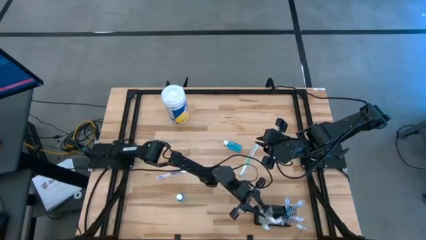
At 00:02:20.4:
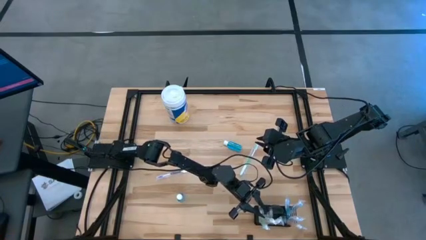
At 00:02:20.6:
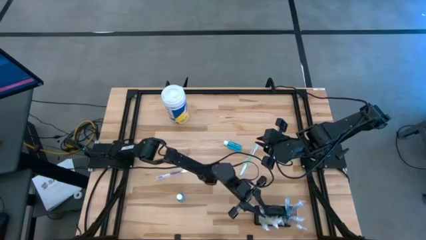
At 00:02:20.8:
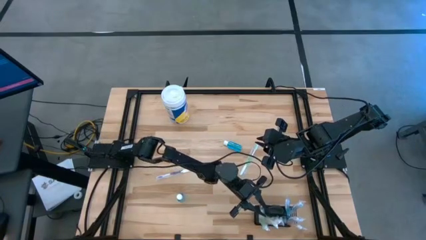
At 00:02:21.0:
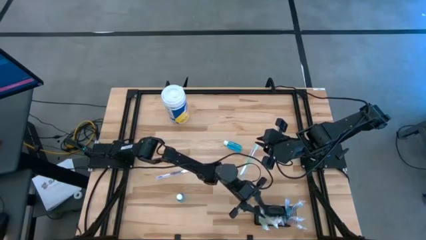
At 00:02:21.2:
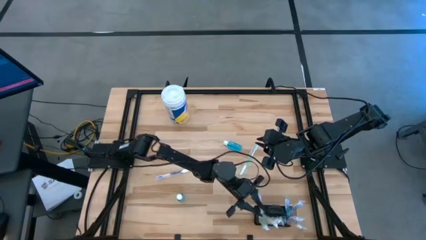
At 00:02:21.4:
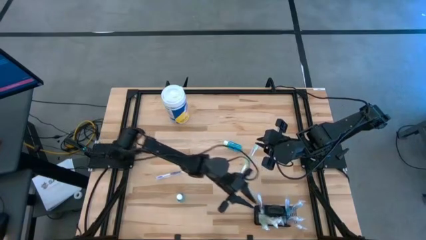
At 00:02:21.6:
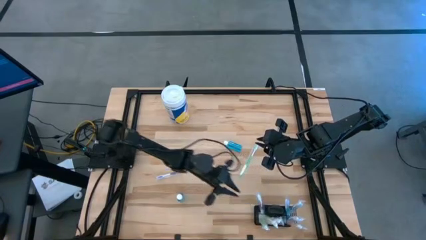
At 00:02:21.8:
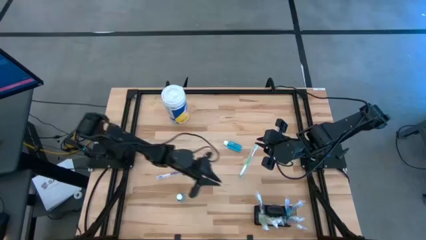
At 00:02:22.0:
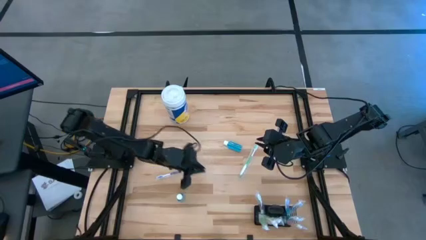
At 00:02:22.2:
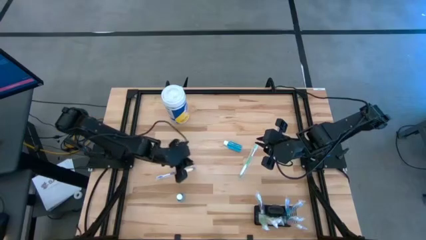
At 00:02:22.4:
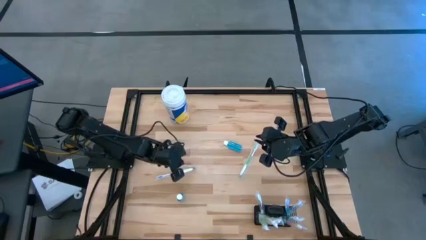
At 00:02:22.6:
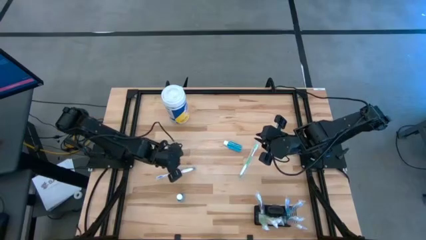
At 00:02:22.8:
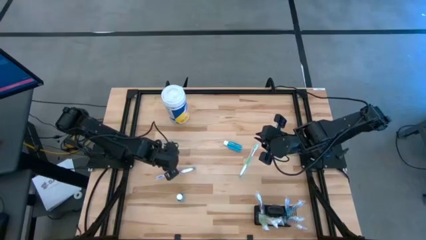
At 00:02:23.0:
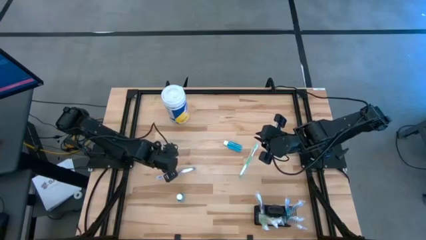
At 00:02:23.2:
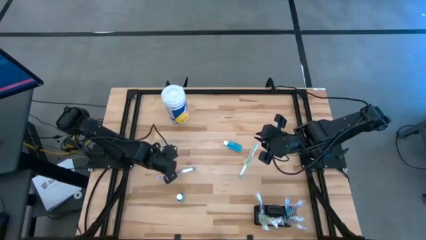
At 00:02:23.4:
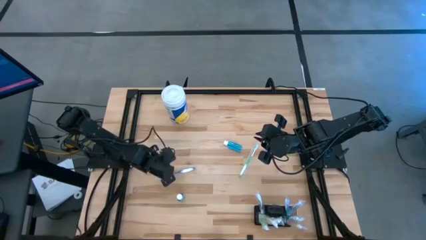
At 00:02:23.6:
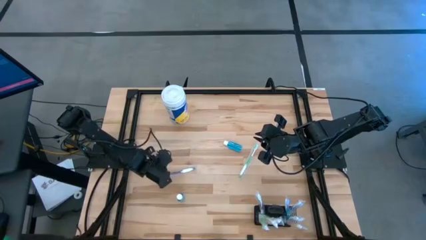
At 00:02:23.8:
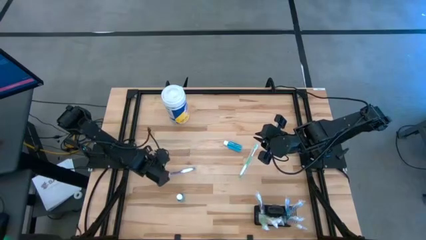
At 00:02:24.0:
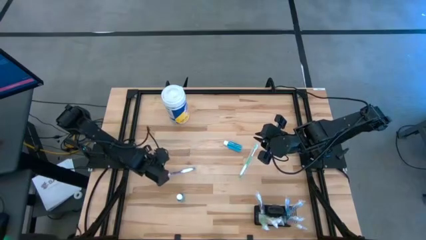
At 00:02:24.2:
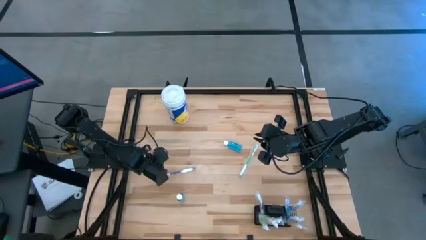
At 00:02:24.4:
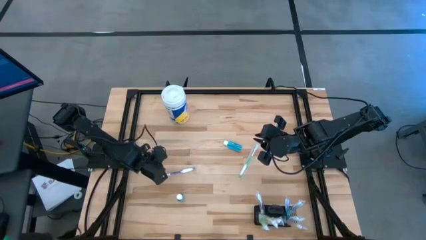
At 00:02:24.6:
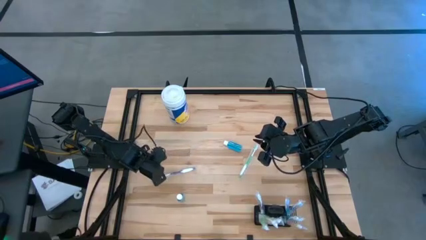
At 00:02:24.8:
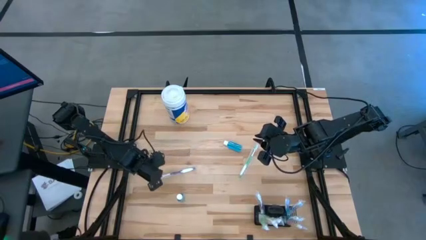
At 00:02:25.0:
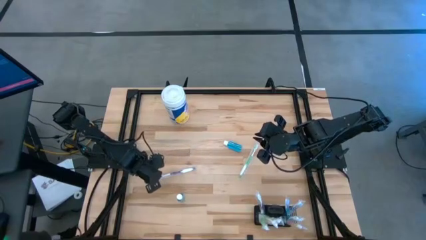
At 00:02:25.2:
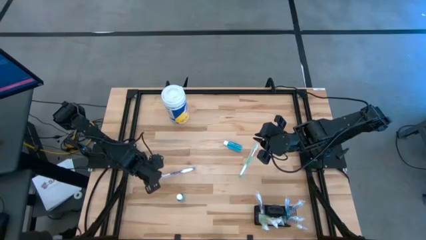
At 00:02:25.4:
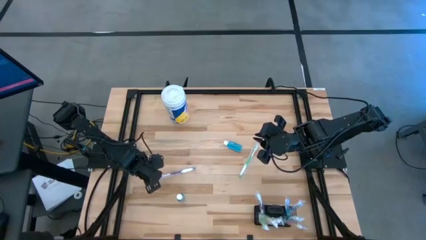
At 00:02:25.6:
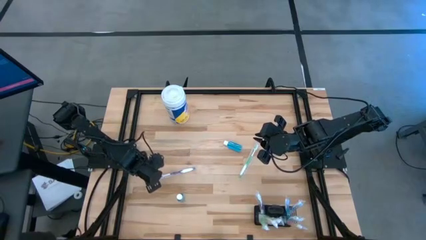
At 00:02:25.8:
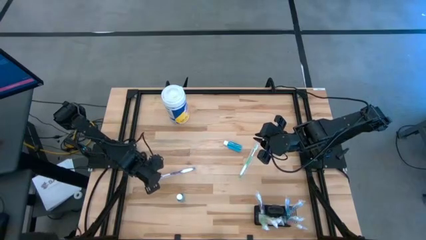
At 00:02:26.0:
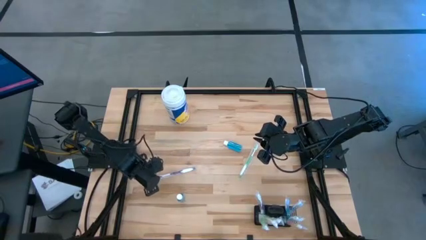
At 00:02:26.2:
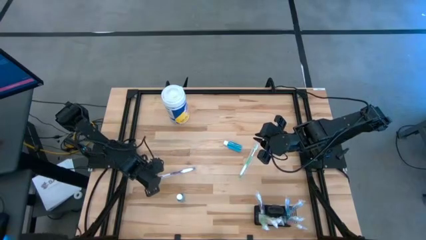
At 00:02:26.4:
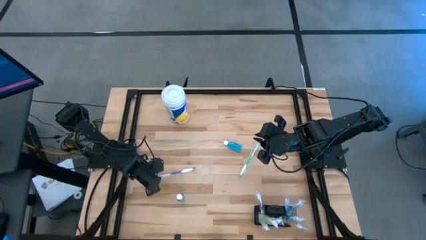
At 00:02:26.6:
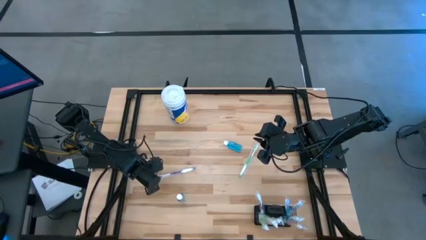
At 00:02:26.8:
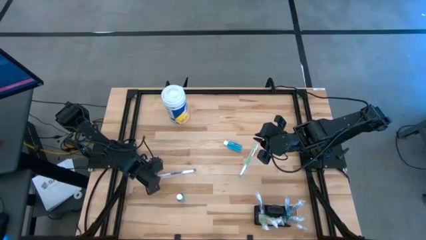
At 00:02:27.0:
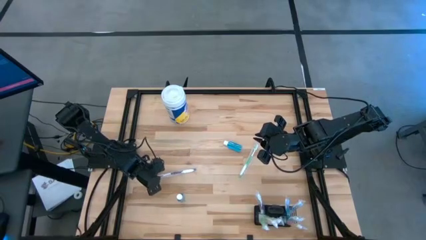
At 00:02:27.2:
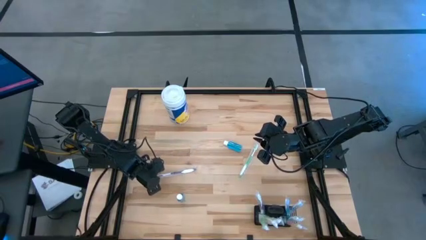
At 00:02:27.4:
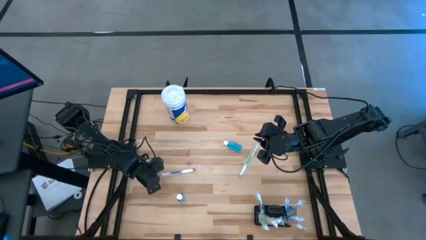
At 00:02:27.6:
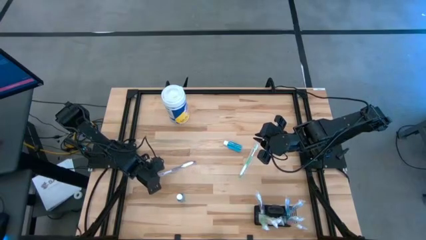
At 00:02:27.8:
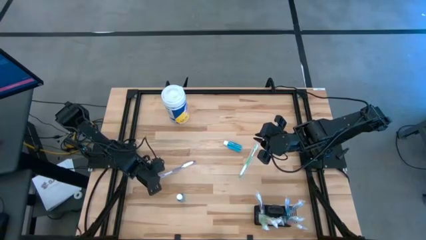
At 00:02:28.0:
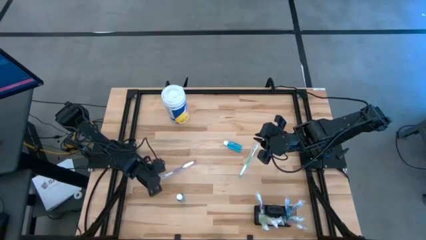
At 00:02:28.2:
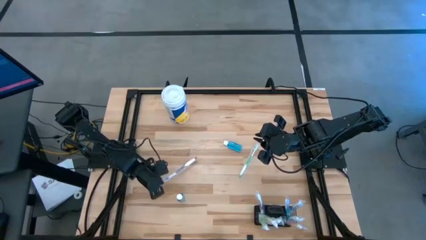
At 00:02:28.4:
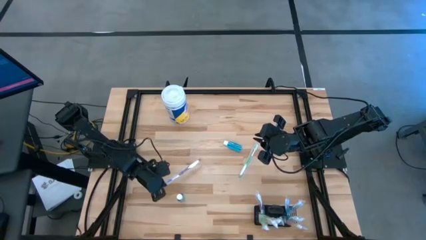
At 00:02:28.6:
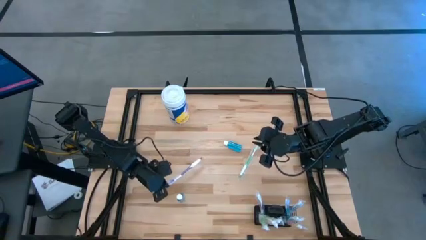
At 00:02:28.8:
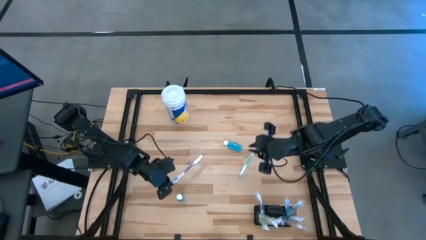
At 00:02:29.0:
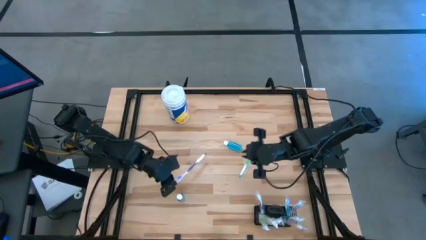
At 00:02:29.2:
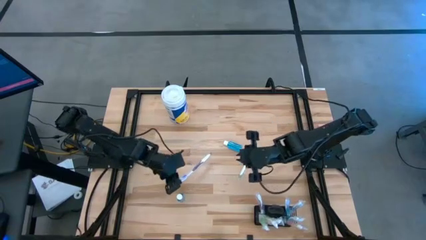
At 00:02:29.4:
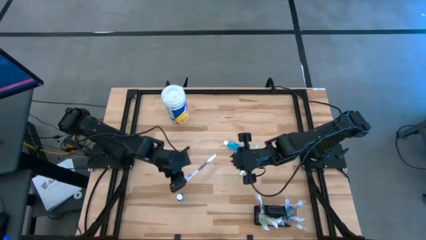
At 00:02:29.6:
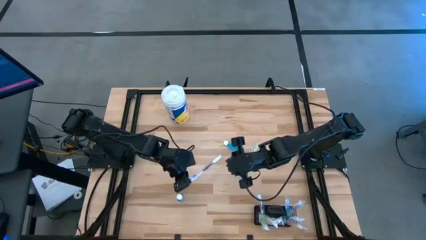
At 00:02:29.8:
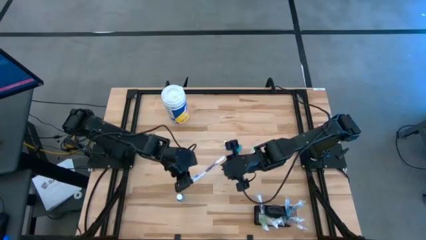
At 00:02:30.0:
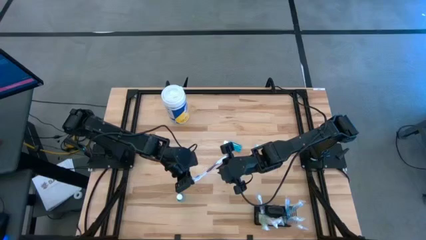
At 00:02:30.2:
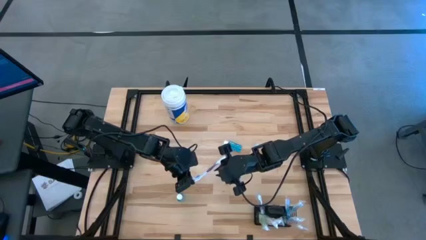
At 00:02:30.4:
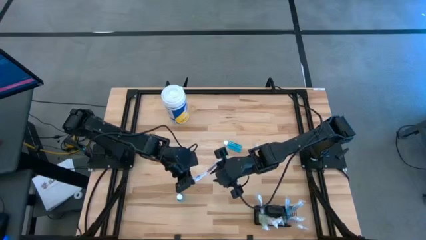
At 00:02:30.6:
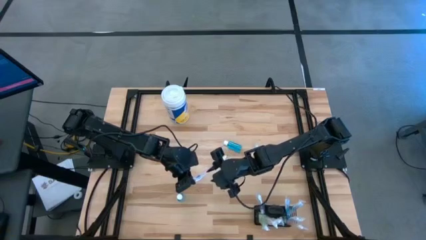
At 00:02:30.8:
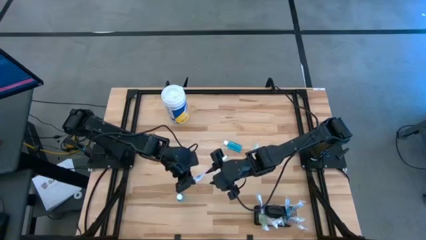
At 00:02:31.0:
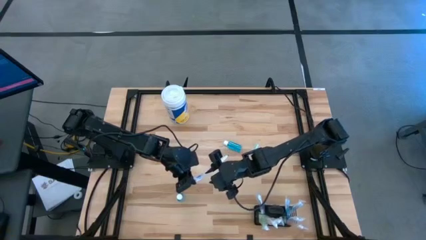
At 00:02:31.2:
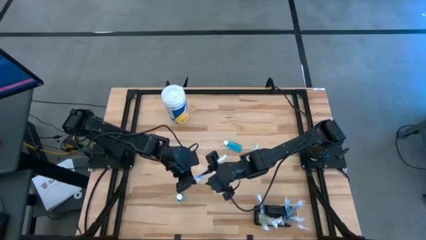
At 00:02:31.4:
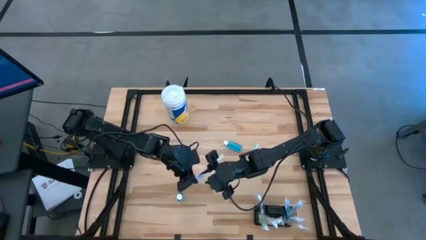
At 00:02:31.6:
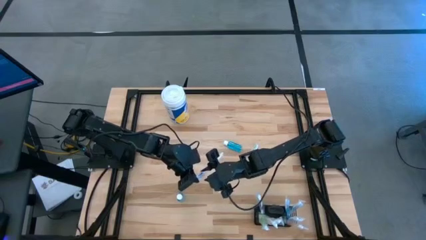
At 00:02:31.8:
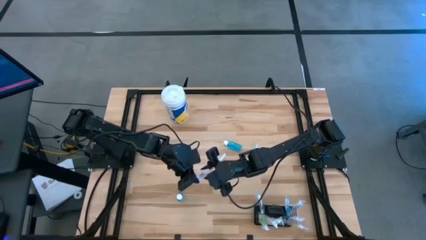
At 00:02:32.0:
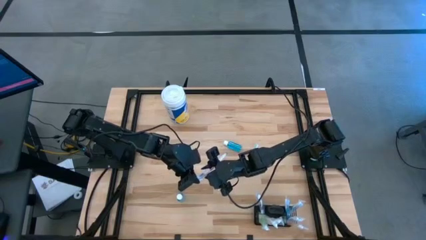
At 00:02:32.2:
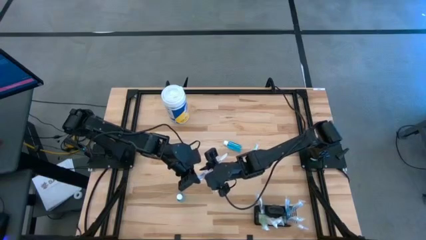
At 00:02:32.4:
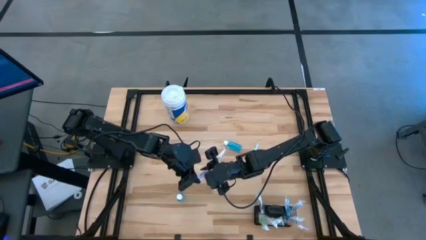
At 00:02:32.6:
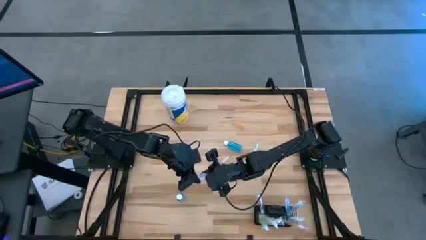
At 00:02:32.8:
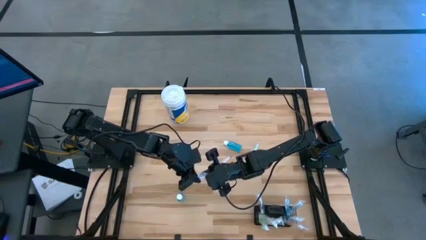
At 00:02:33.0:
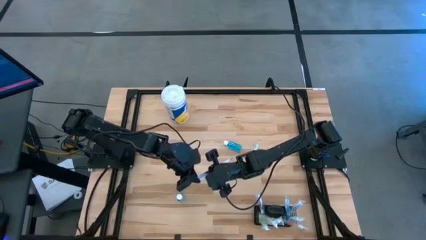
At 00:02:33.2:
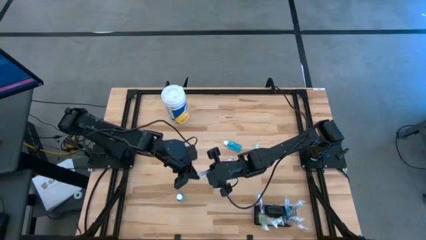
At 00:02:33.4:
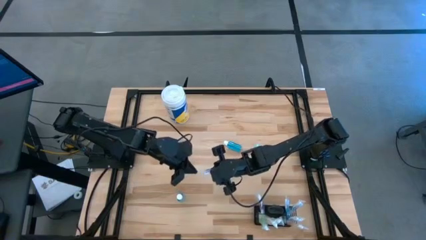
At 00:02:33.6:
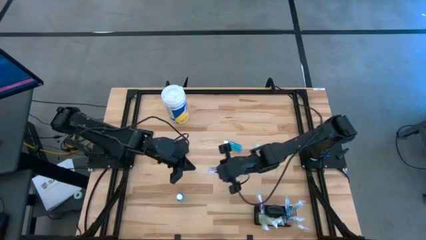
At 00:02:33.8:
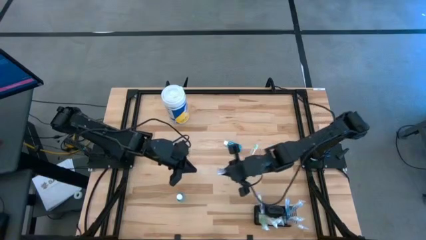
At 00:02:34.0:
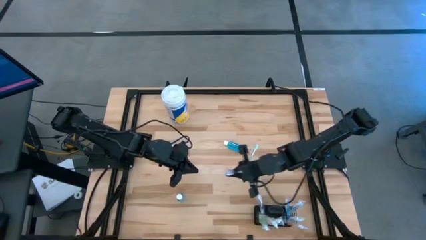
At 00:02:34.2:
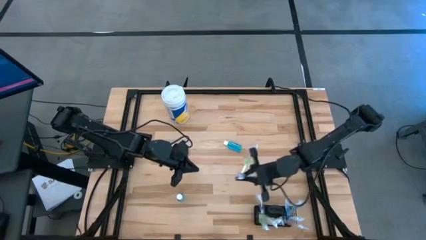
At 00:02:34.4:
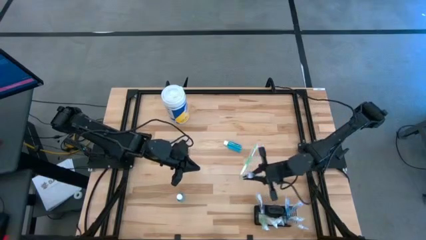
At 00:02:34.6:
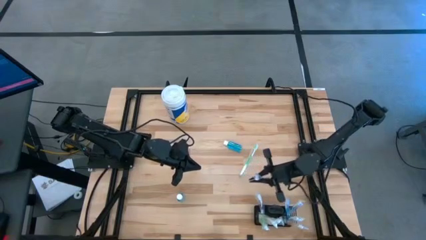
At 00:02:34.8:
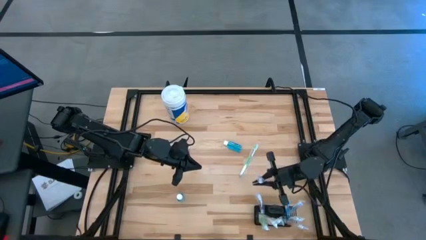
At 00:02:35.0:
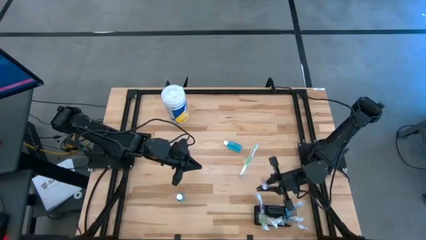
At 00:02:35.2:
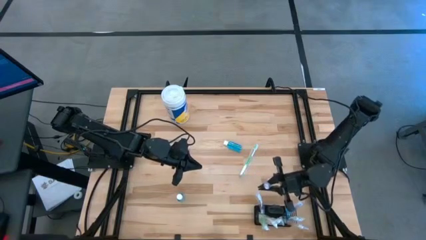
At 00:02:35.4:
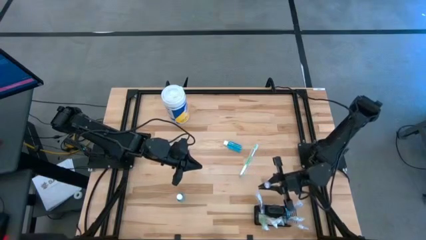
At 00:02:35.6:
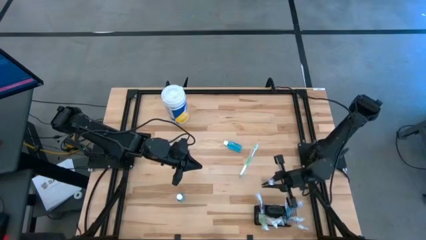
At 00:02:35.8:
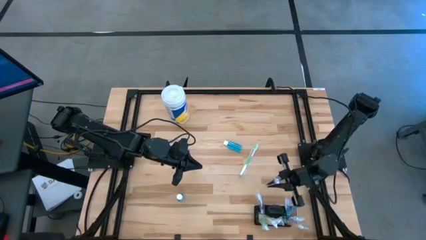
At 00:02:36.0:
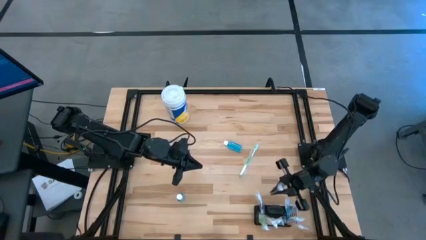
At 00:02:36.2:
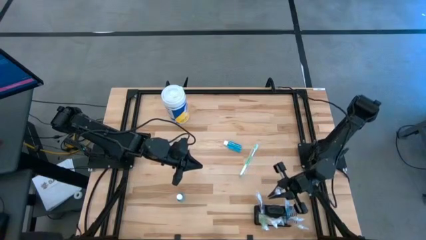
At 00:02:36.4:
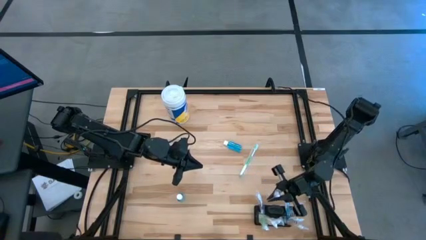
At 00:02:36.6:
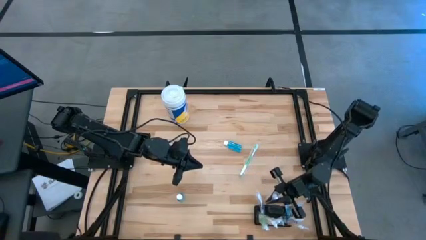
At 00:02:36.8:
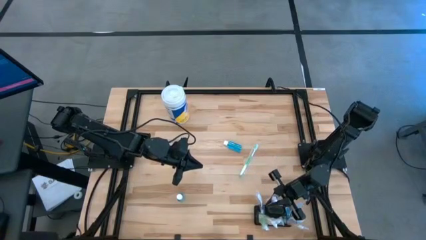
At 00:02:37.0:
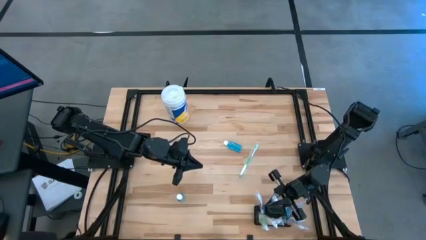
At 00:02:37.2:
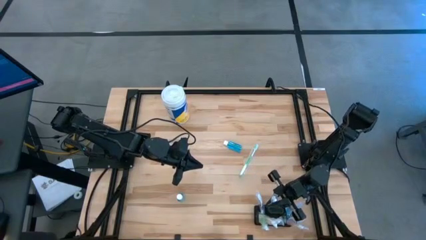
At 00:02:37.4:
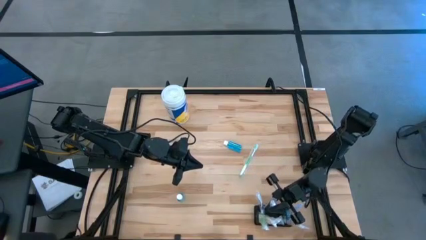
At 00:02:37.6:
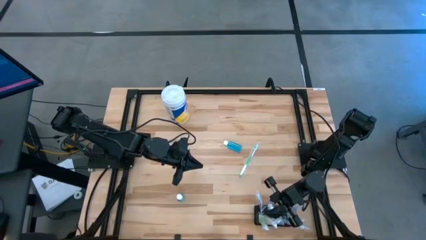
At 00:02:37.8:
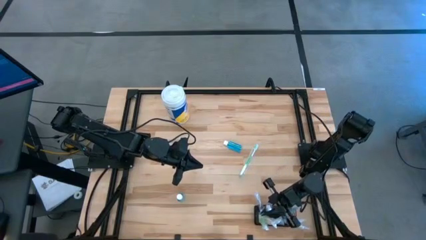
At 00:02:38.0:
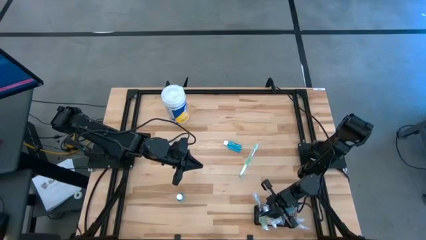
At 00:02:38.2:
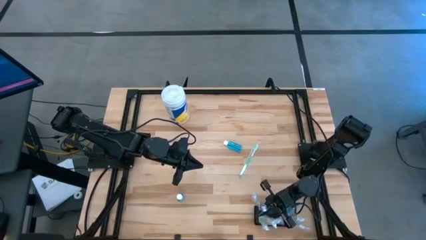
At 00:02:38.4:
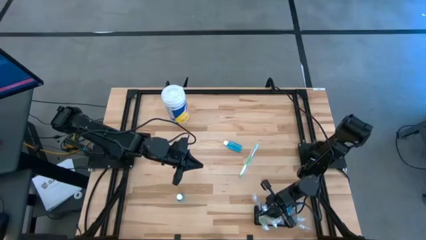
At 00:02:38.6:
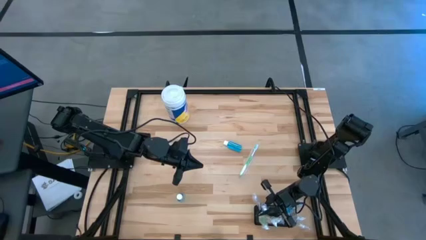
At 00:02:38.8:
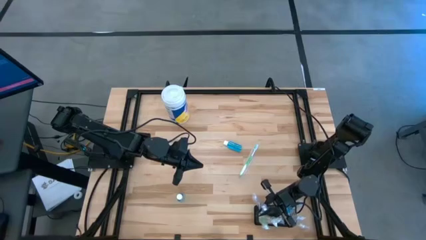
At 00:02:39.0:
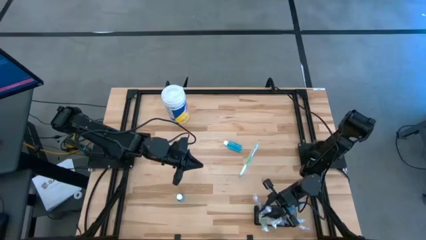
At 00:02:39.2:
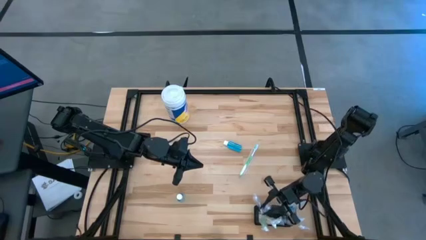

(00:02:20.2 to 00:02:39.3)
Task: Pick & Place toothbrushing station
Put the violet toothbrush into the wire organizer
